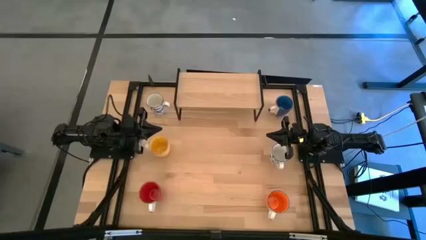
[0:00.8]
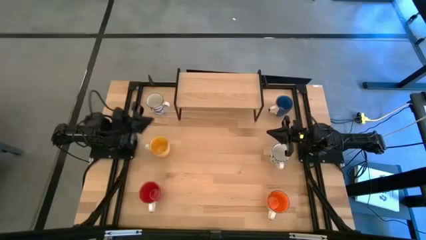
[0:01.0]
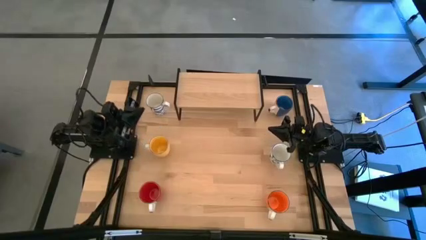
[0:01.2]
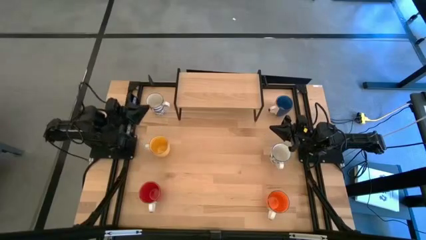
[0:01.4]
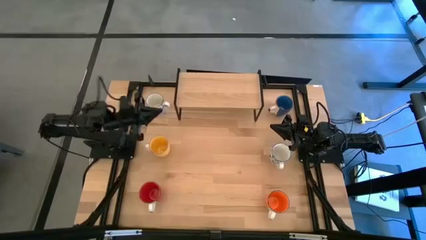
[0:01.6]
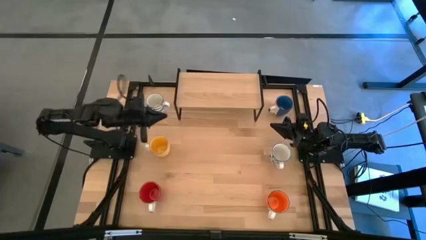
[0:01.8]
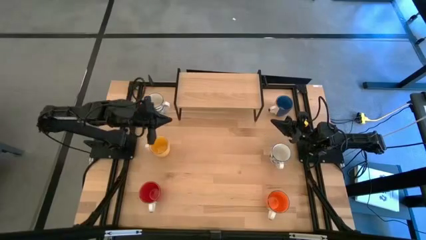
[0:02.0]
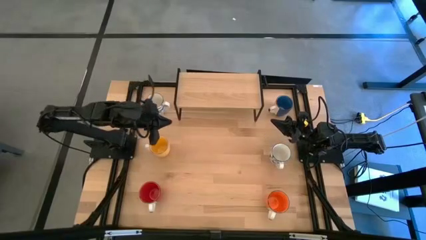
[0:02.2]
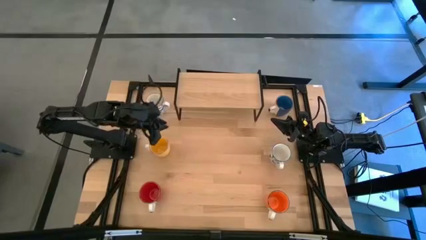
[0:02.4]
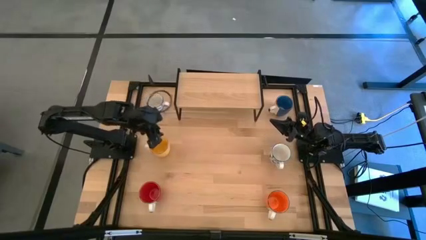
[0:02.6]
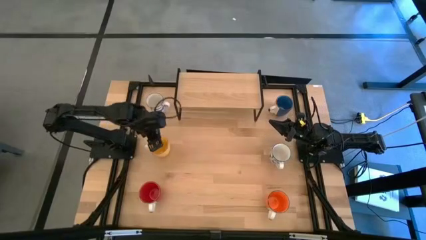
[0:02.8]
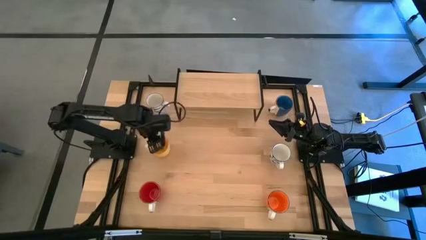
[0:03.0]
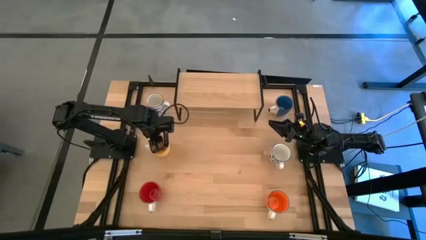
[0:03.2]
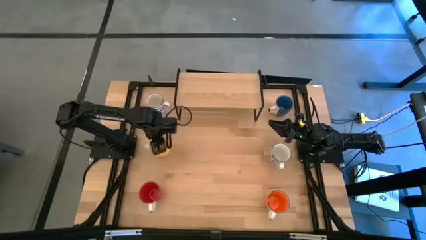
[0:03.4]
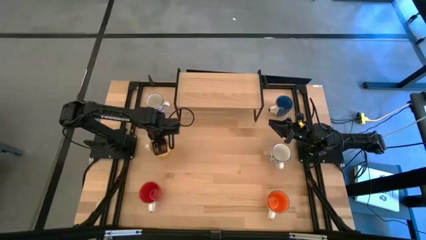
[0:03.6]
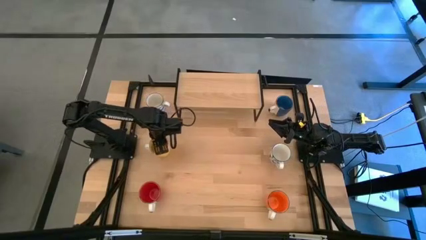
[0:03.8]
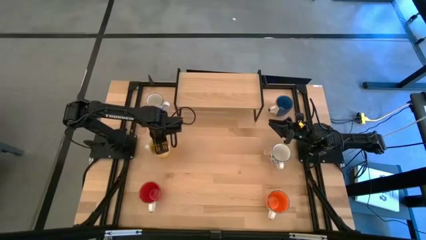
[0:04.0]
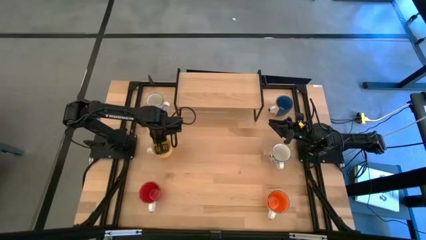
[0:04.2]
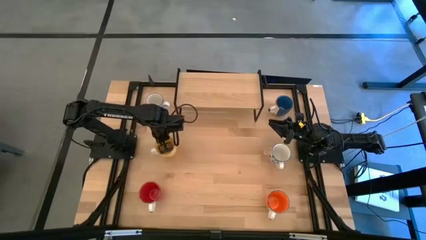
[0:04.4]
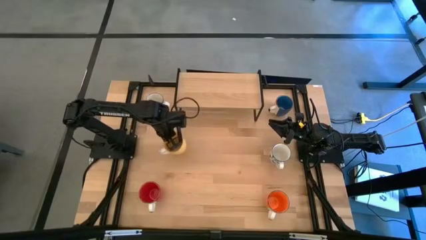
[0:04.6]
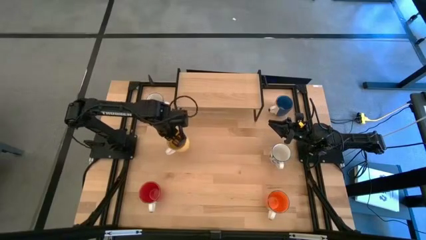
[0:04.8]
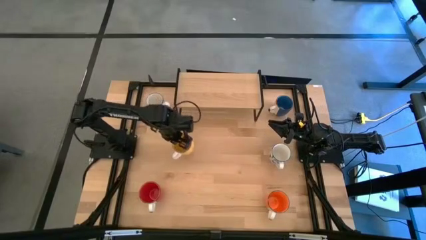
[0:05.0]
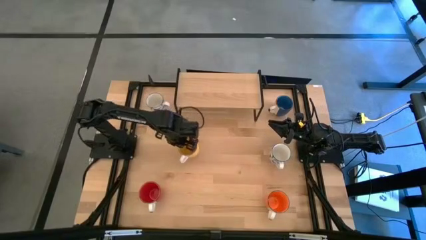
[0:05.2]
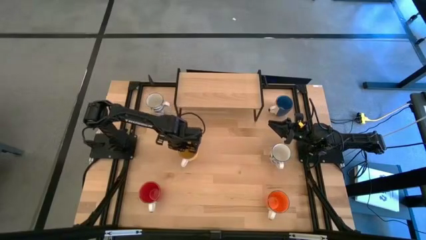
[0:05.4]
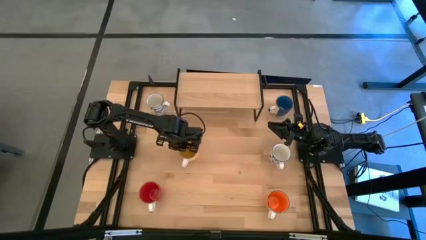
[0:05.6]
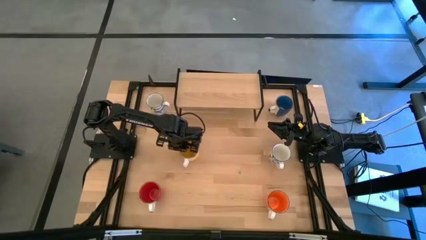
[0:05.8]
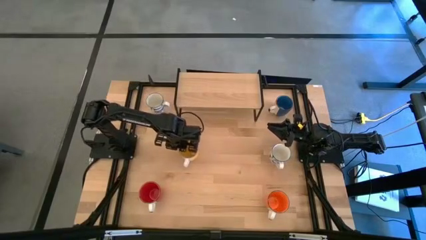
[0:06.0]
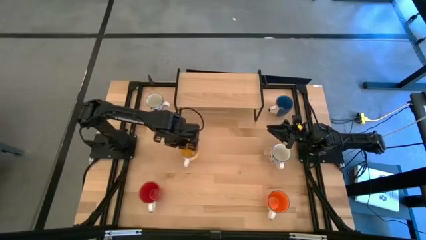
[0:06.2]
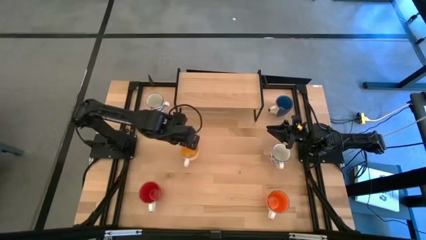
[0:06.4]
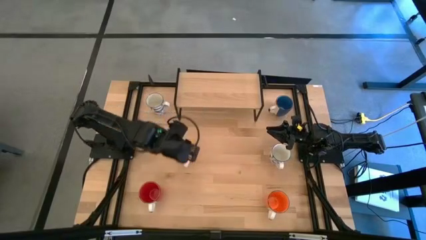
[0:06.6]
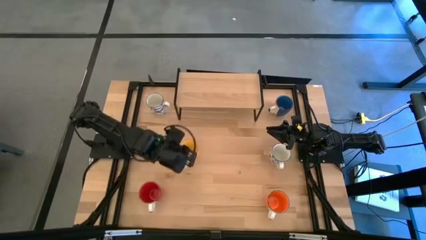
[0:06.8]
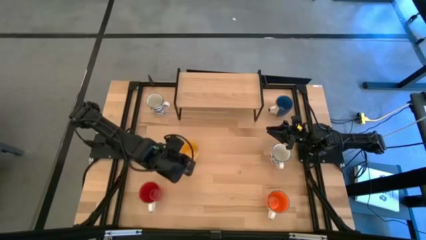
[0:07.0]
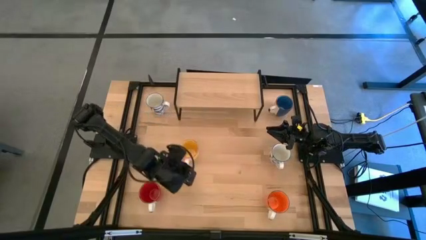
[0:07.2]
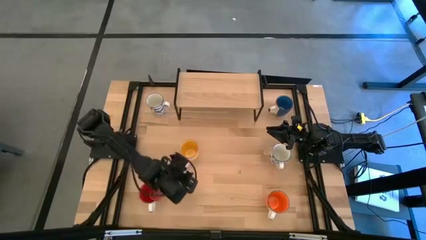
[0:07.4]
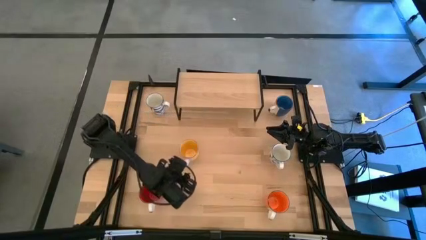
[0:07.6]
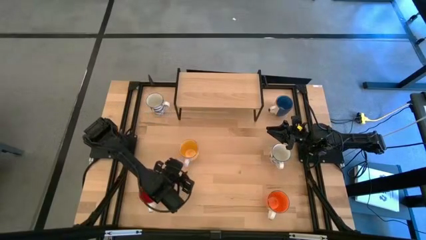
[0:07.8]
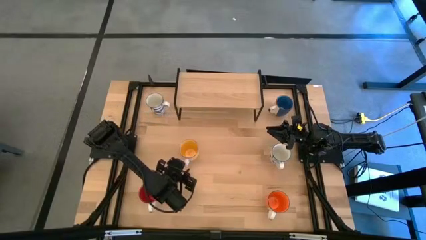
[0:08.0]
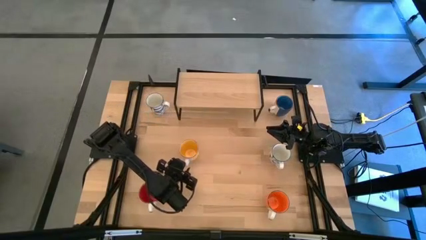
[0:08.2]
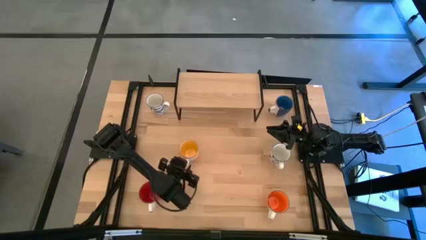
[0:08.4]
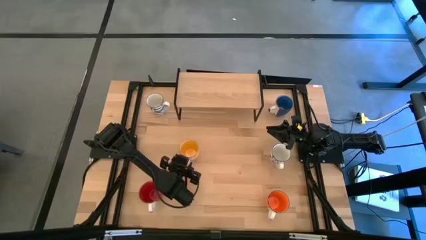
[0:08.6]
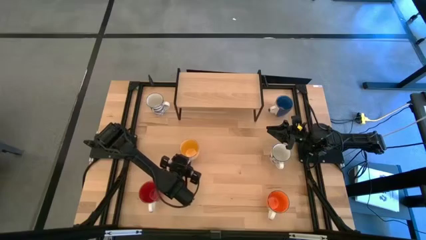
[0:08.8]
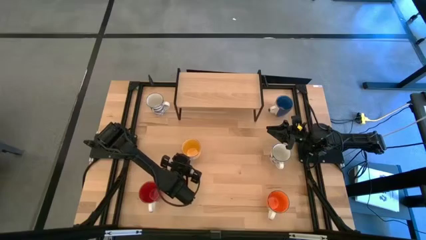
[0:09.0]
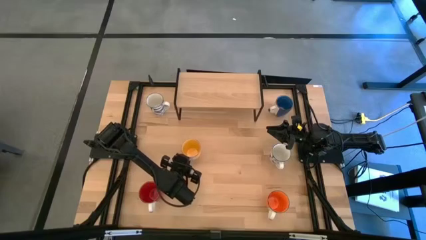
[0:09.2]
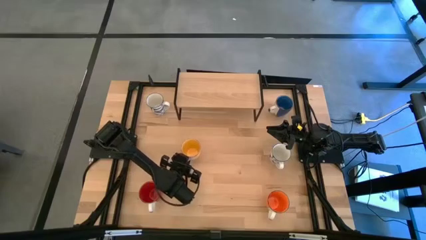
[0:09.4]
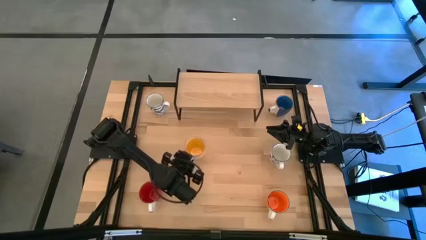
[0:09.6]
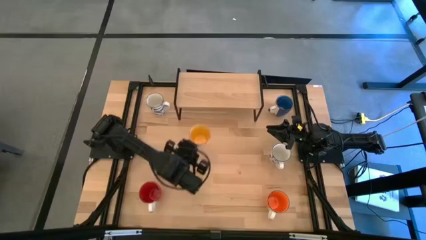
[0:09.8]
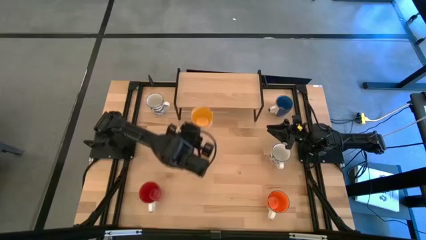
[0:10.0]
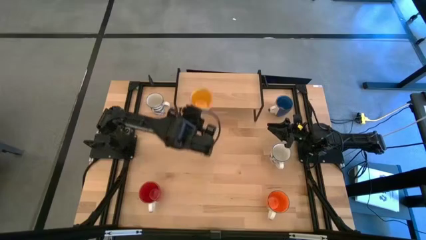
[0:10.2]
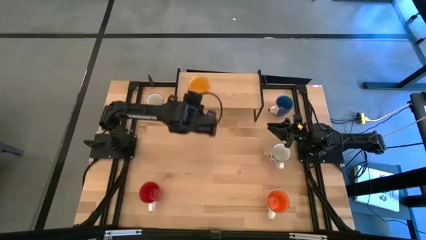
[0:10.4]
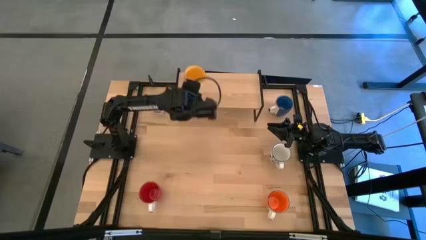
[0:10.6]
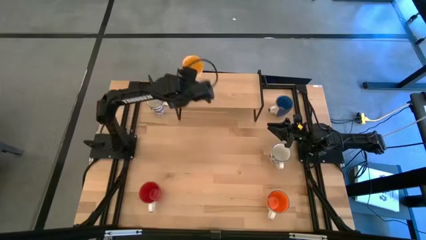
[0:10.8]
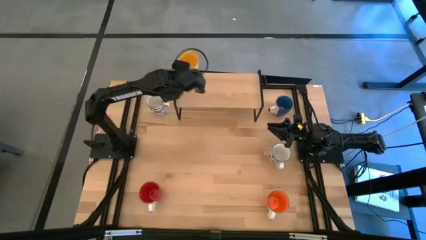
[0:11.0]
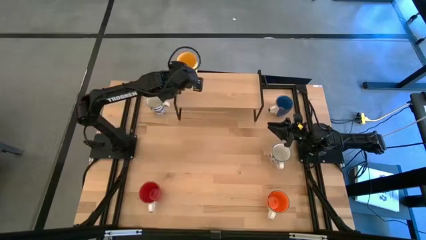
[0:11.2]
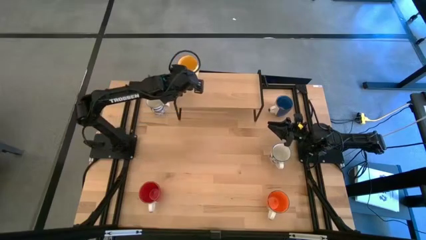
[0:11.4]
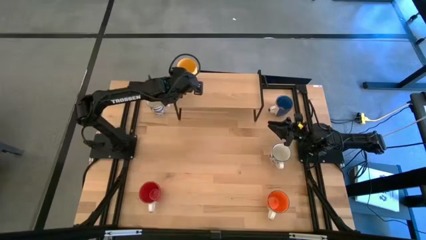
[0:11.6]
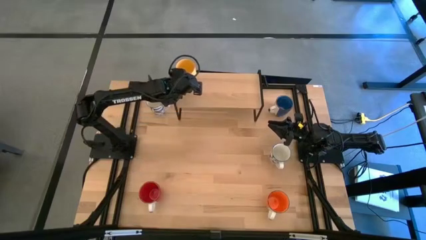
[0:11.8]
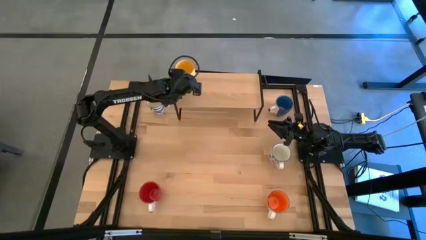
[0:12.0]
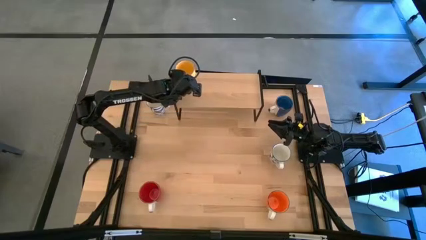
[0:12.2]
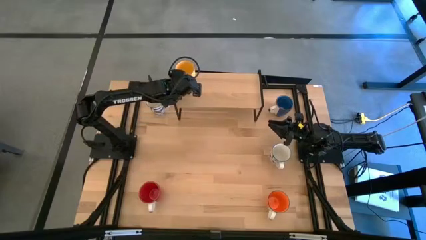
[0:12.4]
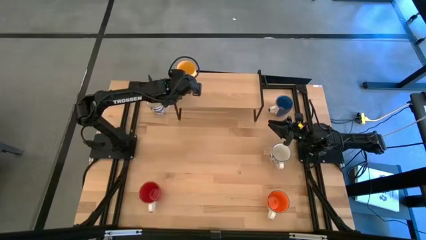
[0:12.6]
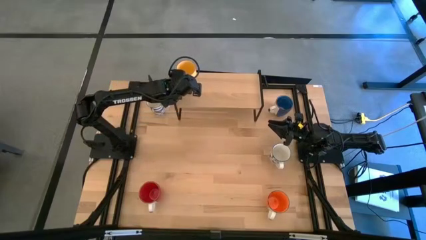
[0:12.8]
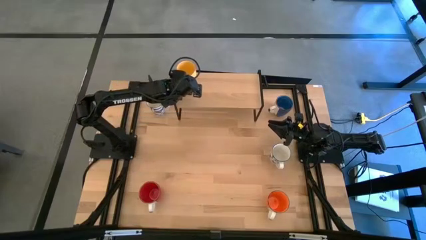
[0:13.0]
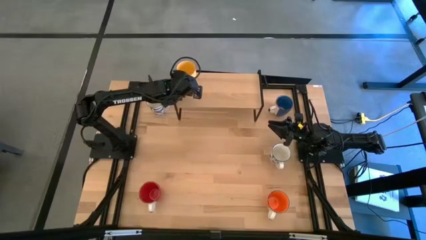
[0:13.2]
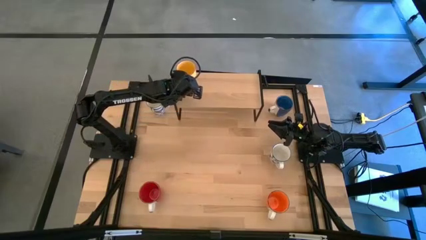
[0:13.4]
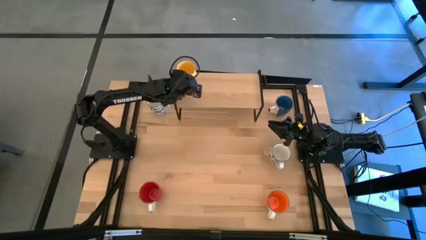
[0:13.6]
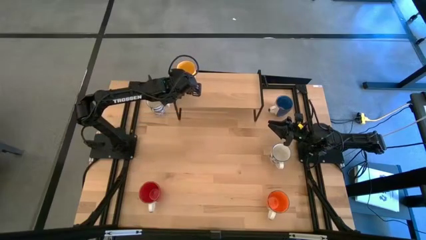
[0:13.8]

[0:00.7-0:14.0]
Task: Place coffee mugs
Put the yellow mug on the shelf
